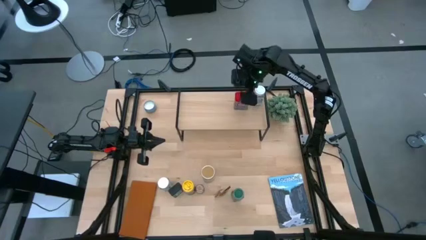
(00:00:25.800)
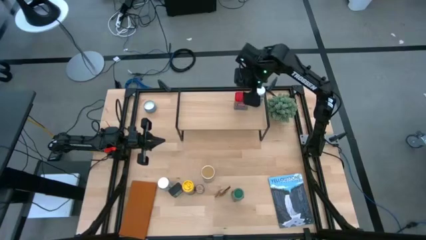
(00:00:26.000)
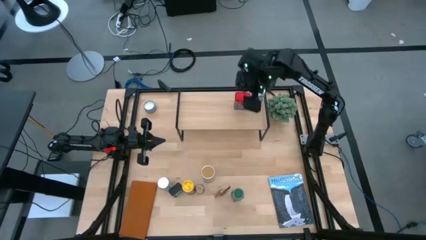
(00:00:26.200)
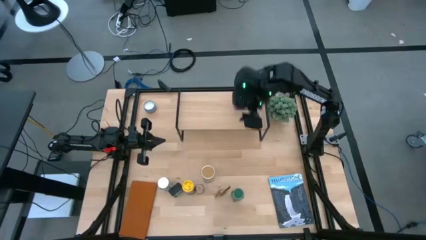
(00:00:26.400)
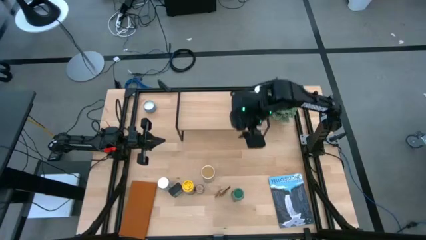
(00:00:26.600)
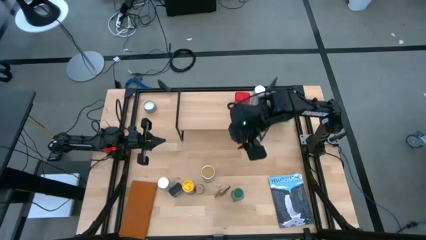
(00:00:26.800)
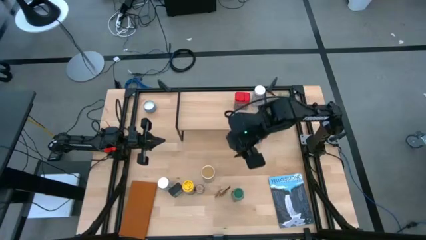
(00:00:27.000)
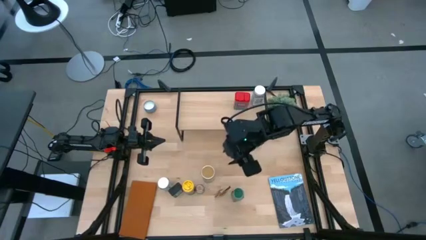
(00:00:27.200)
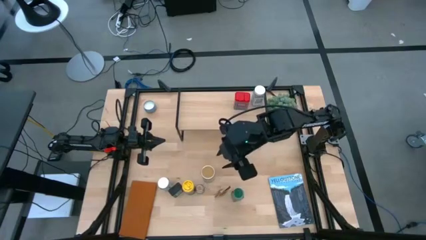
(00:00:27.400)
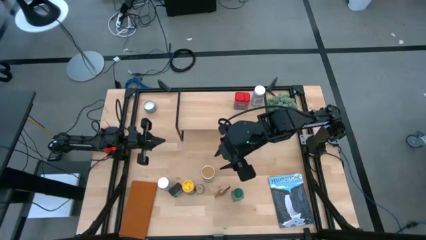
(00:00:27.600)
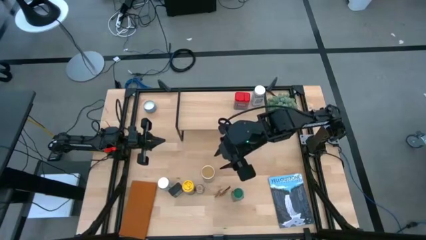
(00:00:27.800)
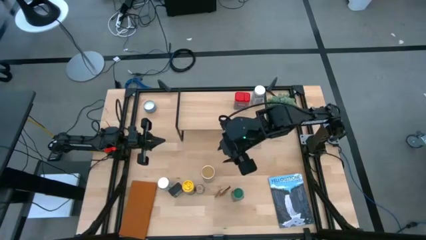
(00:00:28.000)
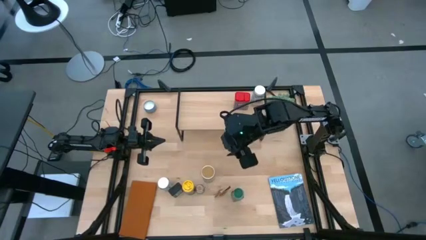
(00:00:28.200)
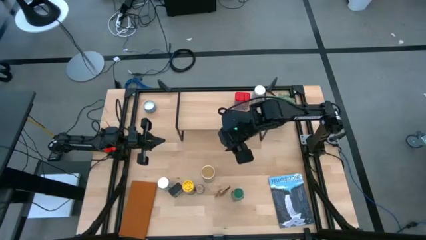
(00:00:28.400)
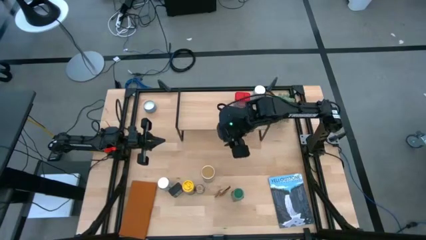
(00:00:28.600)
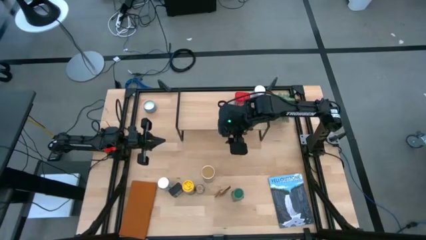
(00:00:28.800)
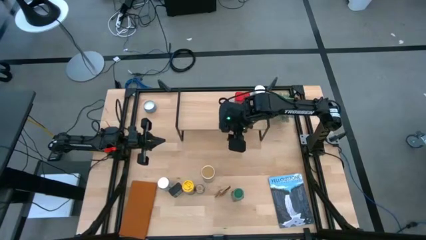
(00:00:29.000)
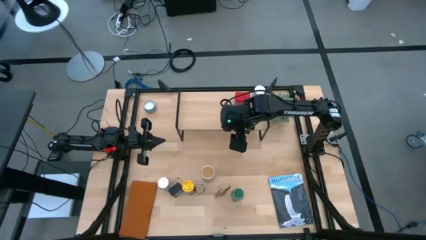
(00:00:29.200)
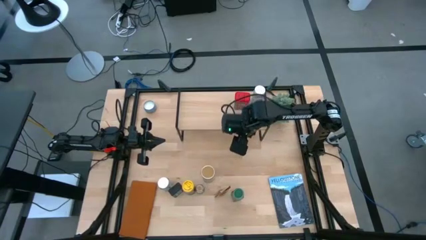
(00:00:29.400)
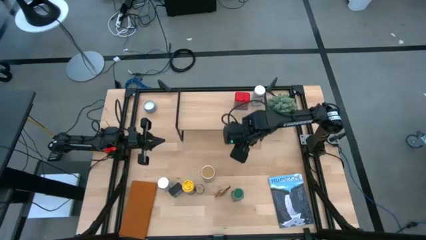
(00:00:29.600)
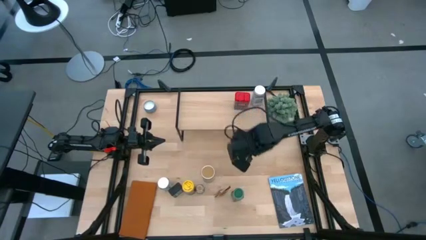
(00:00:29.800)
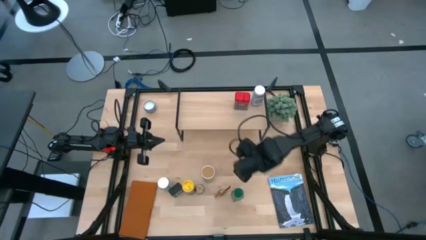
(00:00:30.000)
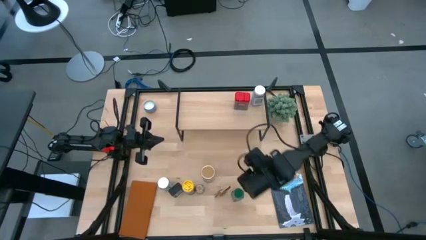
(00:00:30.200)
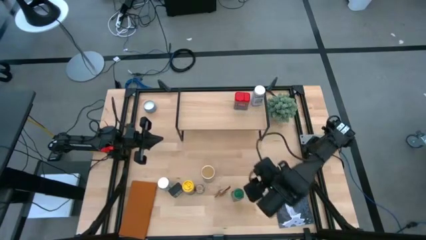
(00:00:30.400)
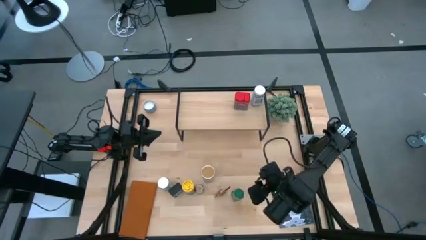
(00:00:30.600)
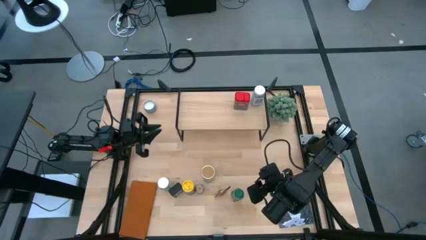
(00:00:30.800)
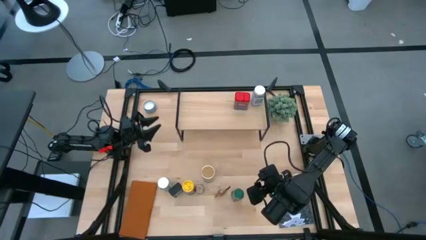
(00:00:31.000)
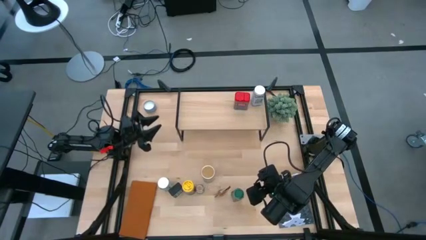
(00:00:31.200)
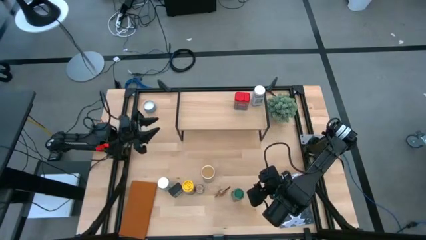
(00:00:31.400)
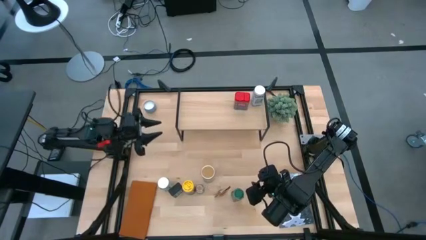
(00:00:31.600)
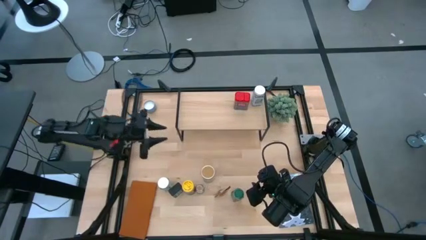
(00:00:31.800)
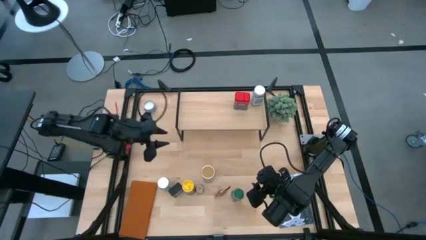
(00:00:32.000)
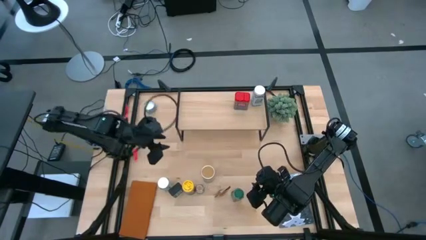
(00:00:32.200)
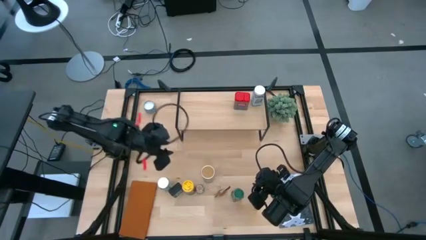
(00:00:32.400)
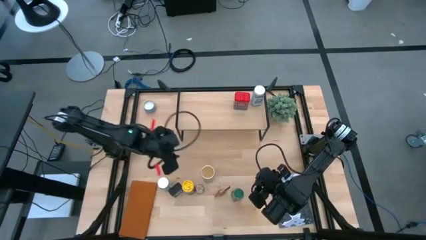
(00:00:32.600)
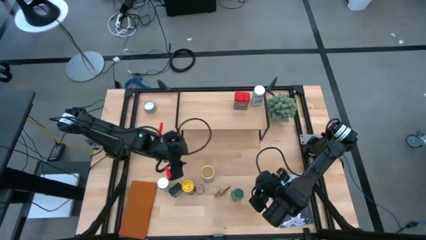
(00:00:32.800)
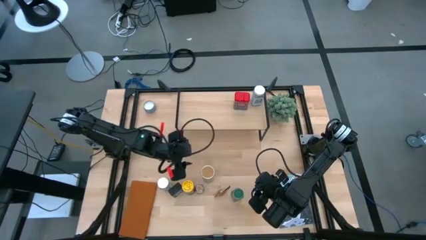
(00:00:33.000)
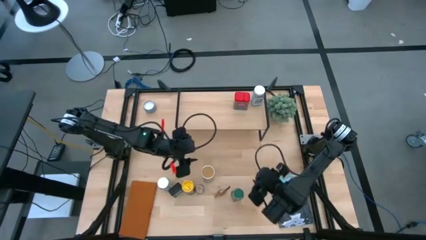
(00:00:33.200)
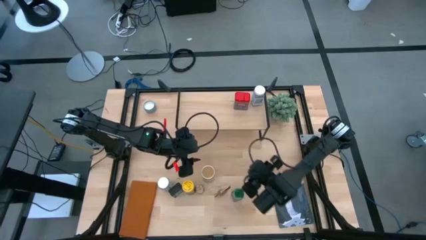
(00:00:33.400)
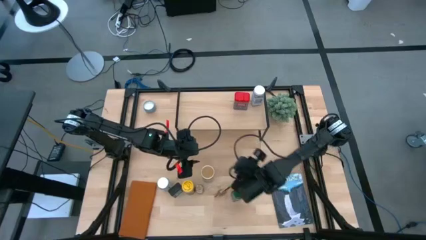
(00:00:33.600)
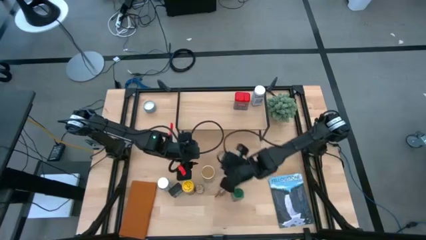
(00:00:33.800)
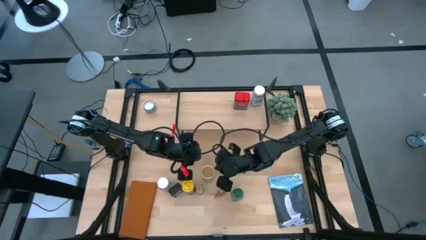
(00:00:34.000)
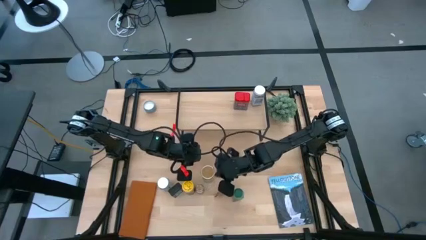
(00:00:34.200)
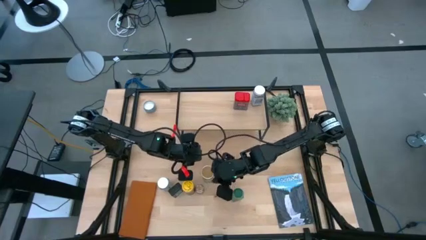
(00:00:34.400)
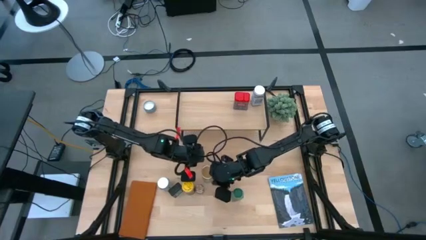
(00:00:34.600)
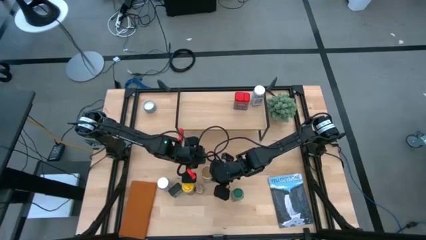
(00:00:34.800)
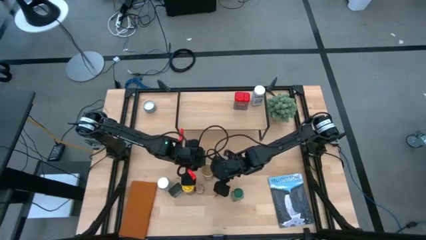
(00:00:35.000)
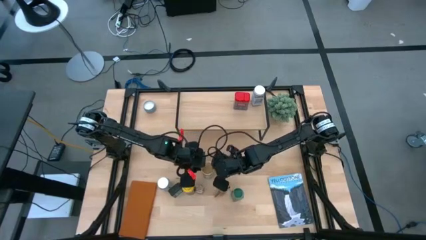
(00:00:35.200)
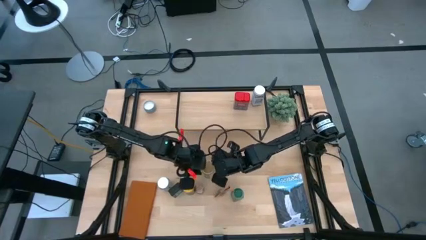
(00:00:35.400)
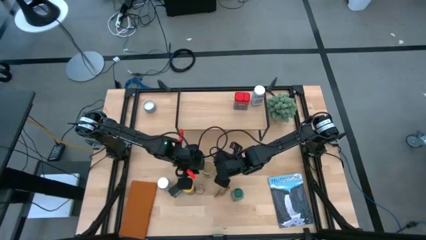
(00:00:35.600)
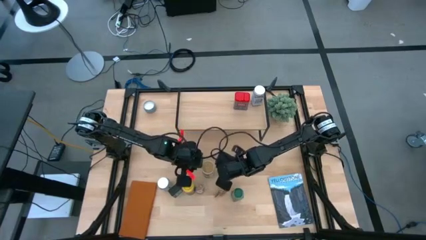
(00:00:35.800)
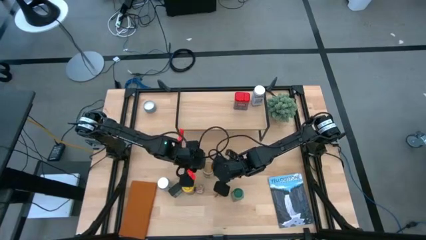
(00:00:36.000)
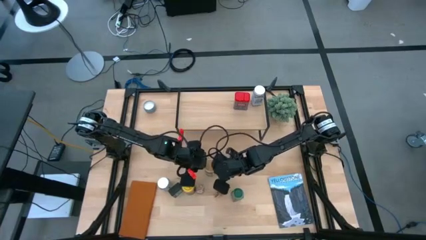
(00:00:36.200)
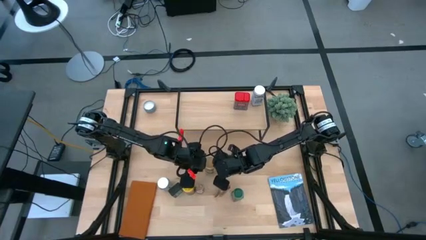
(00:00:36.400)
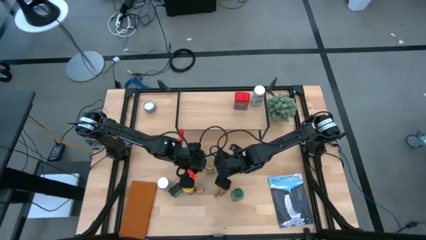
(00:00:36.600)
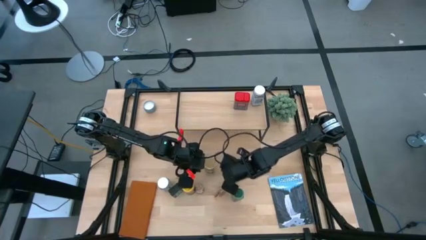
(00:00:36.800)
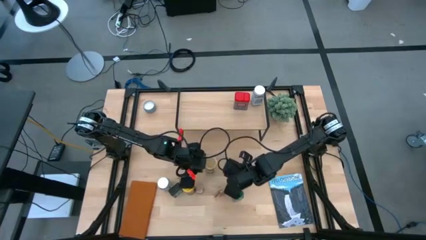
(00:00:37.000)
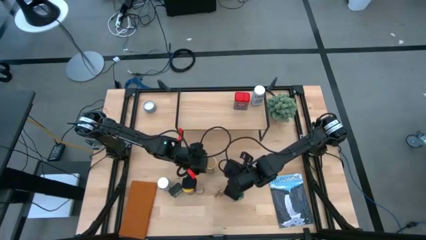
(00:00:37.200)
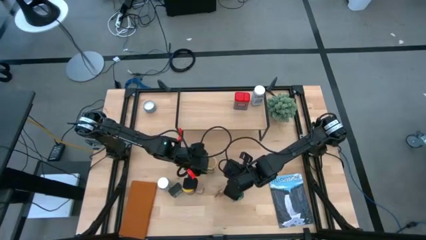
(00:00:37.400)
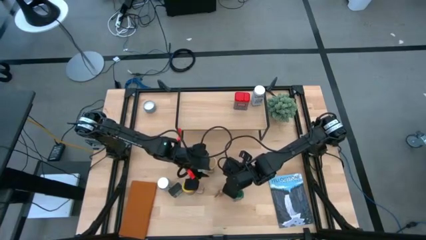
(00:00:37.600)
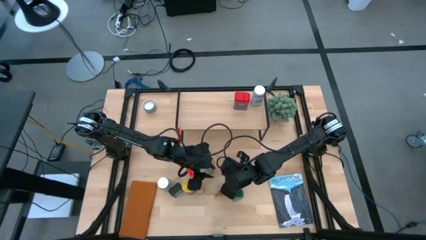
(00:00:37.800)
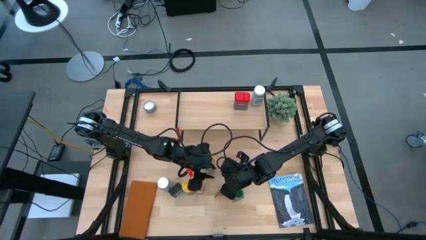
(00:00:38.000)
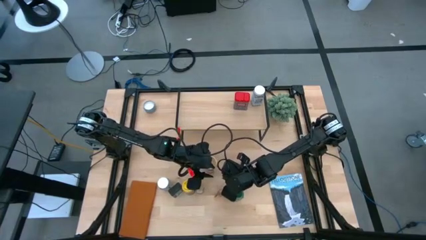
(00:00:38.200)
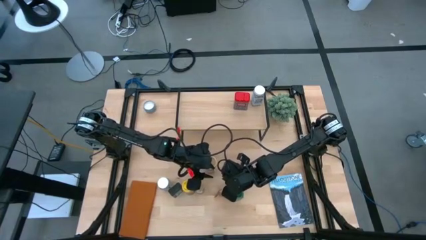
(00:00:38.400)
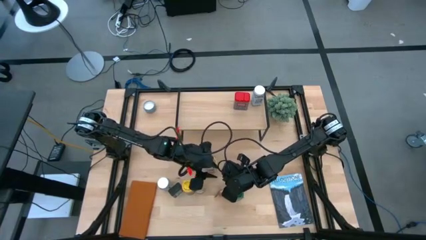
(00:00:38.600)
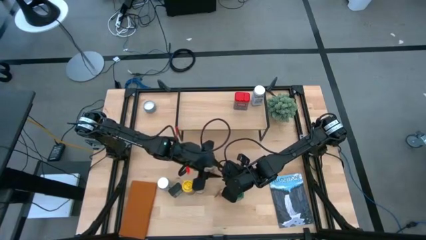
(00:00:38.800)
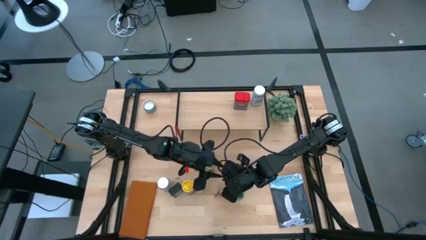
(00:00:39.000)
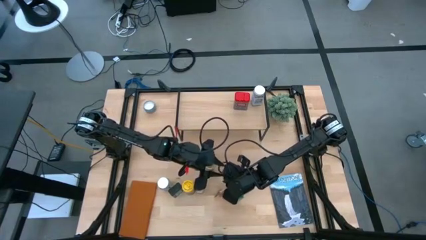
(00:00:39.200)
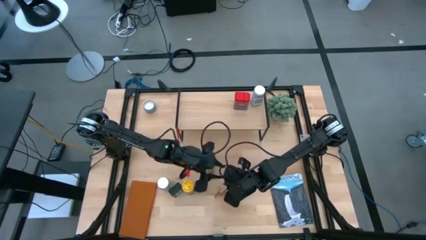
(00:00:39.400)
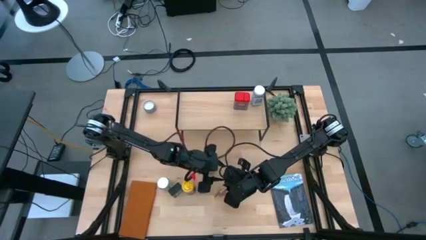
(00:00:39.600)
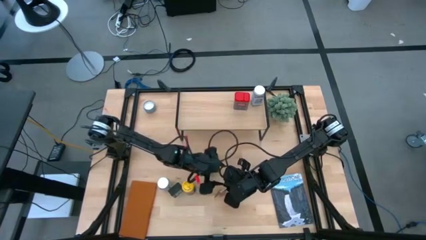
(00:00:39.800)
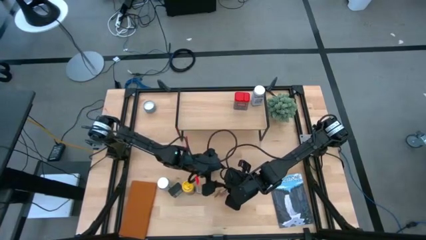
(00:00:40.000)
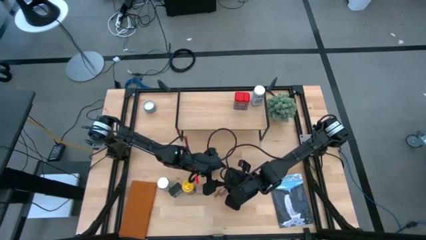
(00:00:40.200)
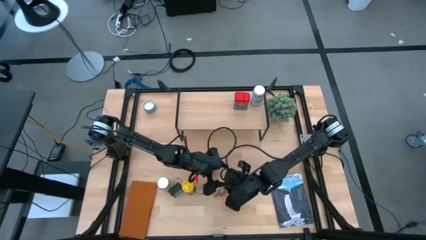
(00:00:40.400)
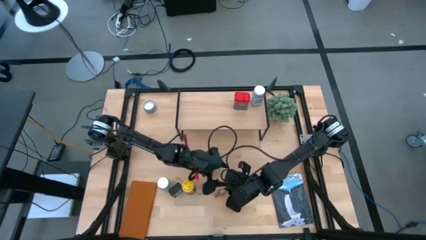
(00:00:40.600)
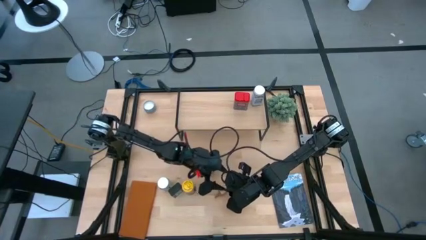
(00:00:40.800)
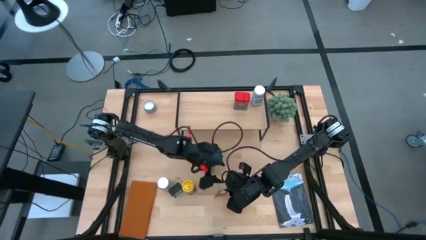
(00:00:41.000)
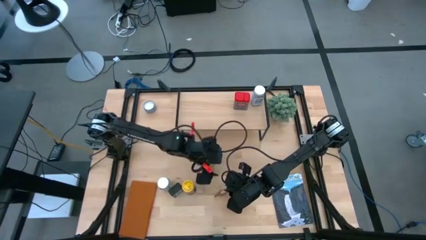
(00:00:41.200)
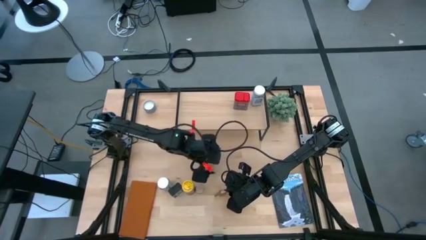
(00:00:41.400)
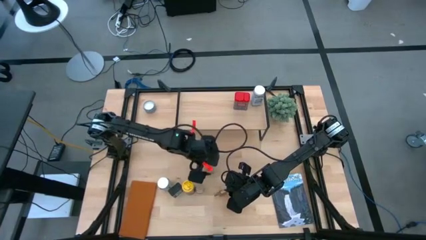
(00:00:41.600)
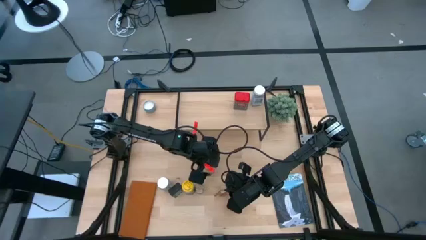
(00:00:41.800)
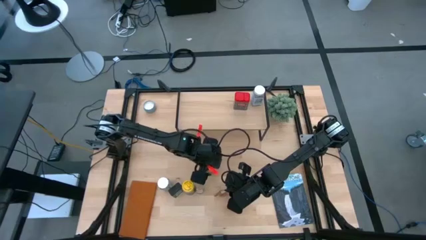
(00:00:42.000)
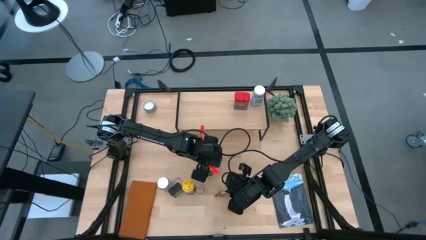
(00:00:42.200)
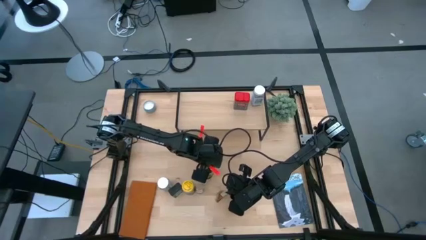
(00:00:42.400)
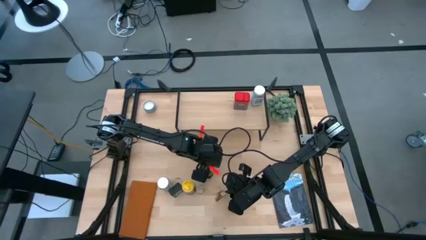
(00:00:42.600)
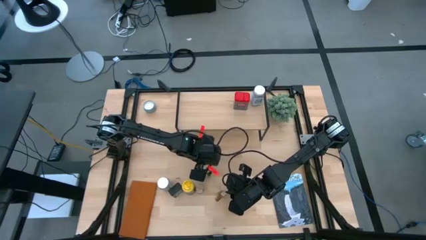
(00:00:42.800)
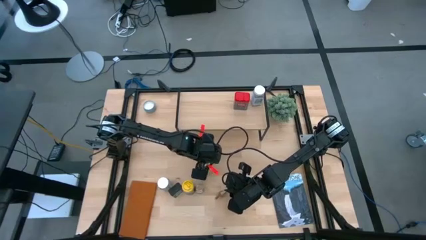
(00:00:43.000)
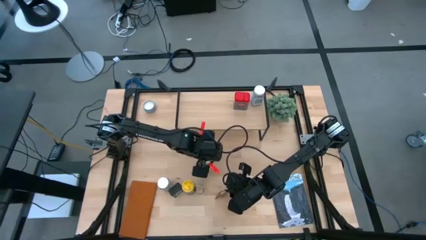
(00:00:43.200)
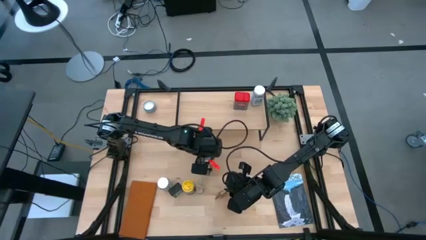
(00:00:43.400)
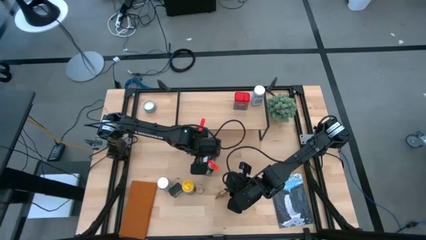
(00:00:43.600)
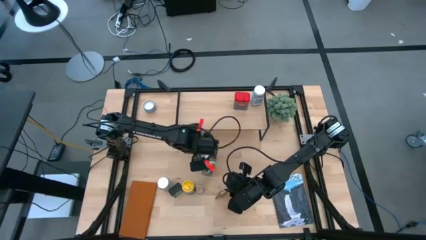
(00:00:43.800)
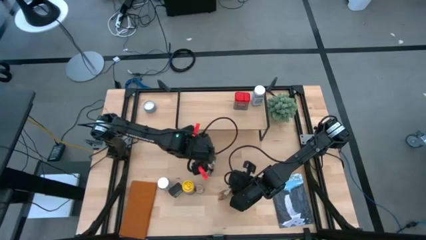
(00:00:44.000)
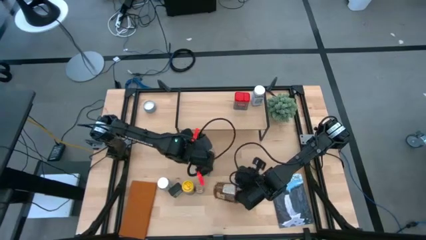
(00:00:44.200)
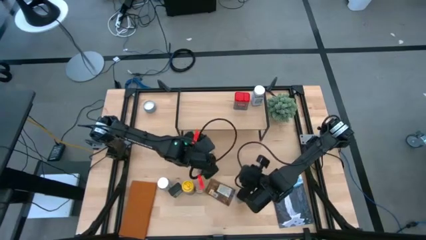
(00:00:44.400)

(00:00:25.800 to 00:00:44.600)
Task: Shelf spices
Put the brown seasoning bottle on the shelf
